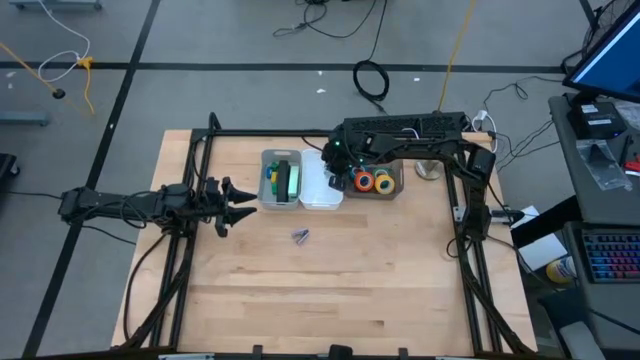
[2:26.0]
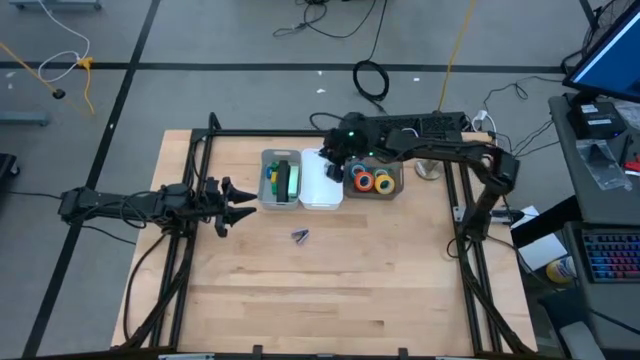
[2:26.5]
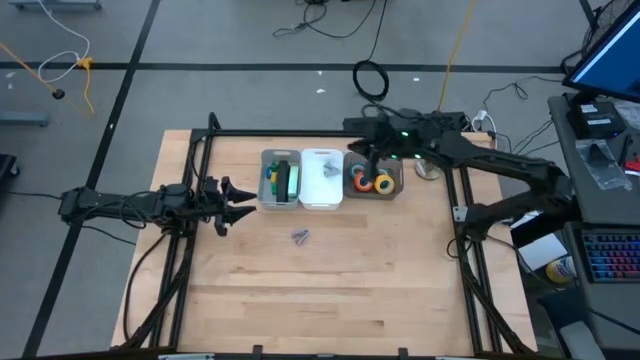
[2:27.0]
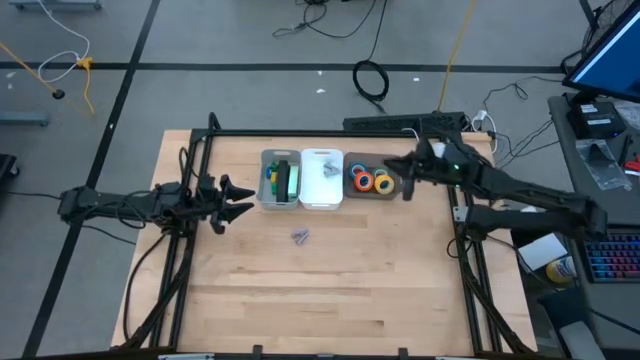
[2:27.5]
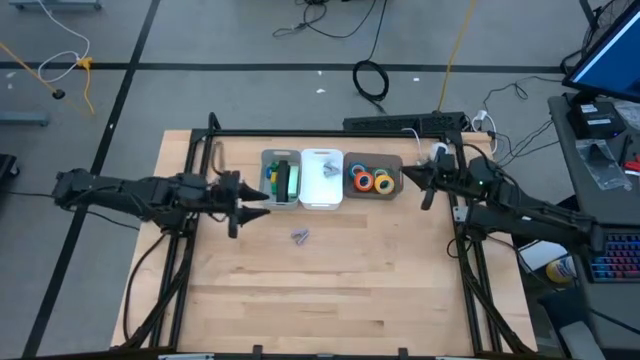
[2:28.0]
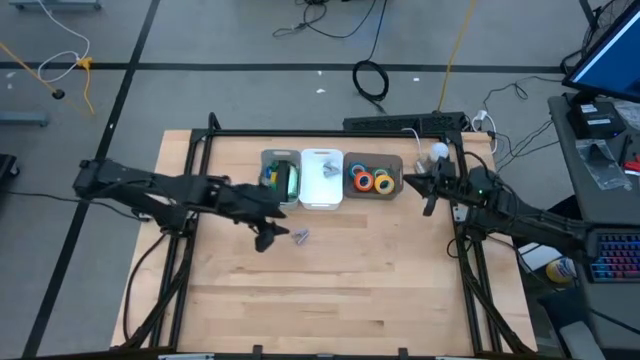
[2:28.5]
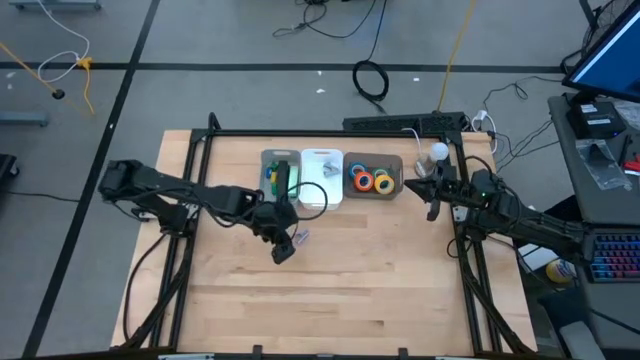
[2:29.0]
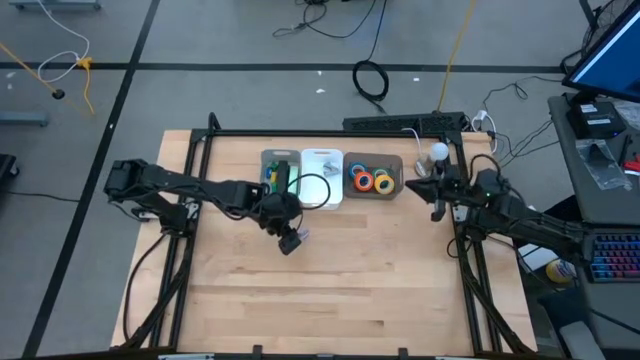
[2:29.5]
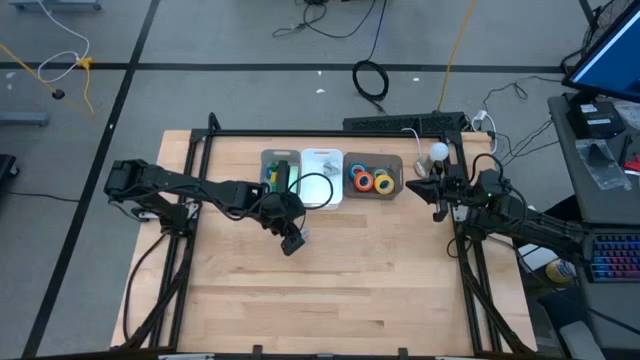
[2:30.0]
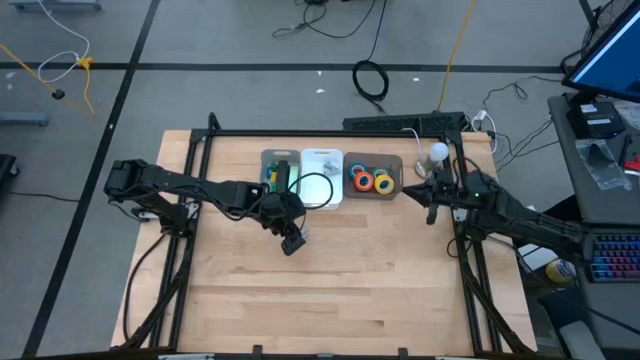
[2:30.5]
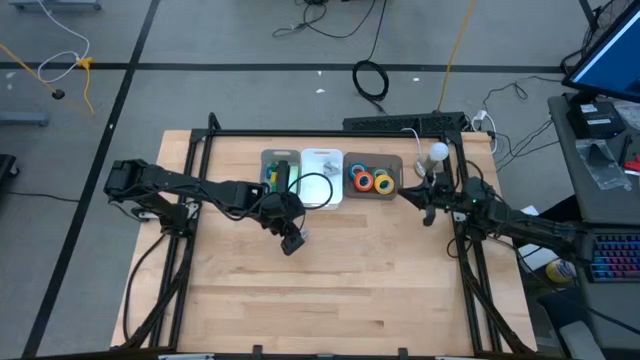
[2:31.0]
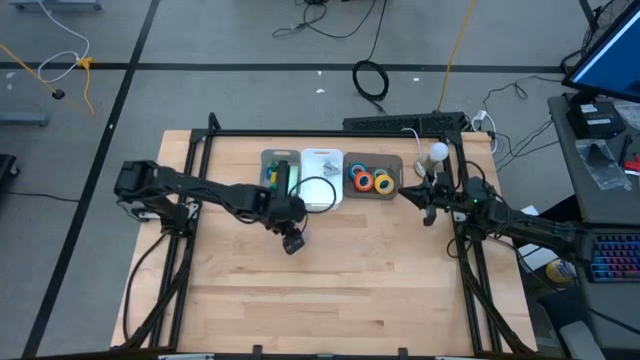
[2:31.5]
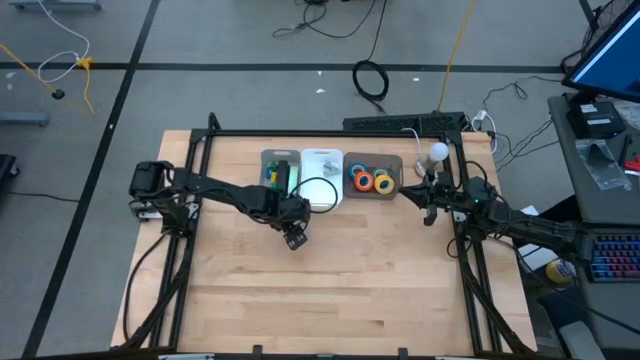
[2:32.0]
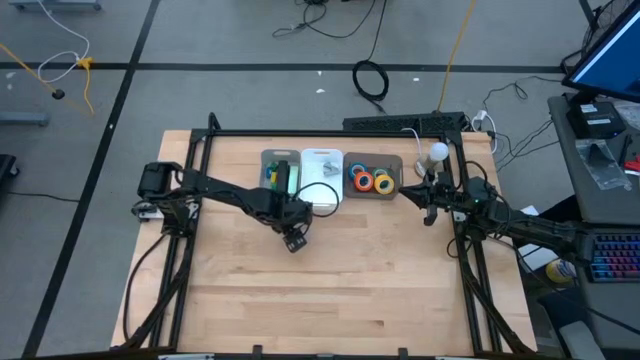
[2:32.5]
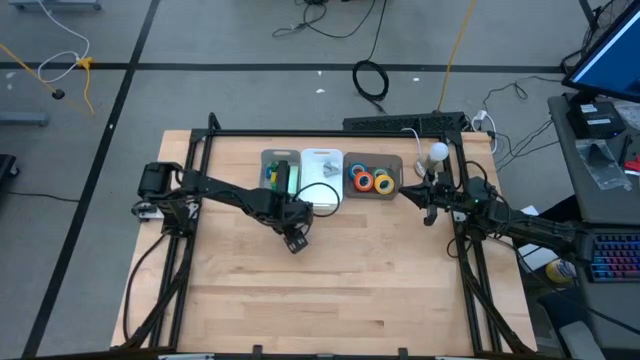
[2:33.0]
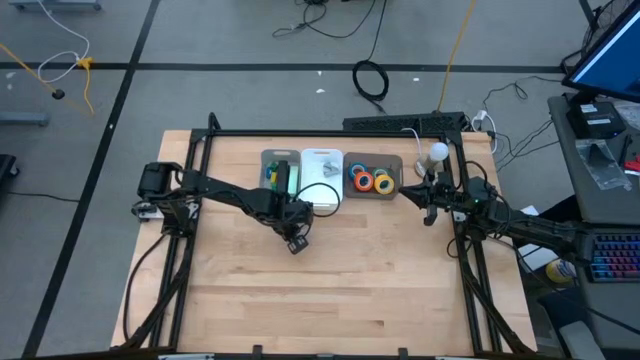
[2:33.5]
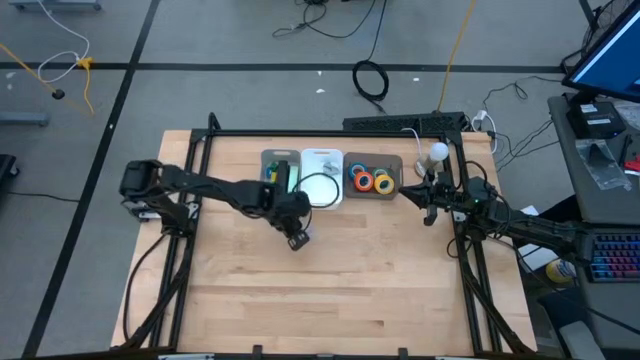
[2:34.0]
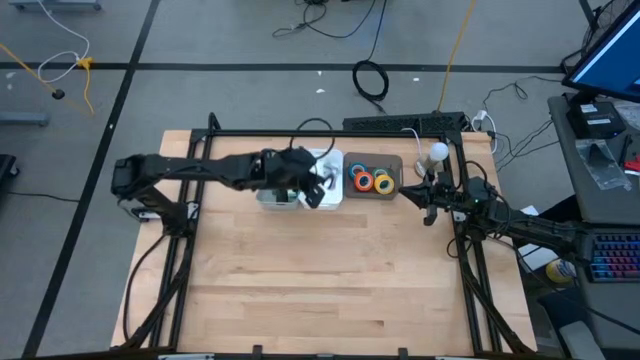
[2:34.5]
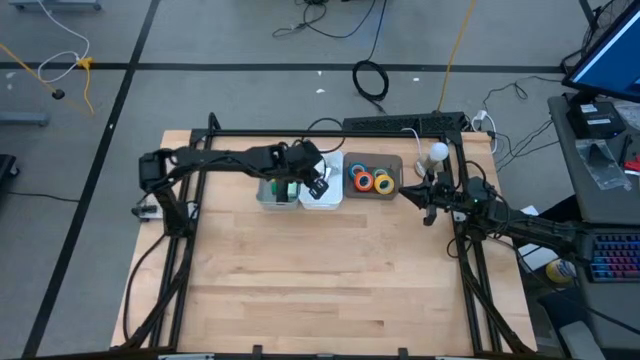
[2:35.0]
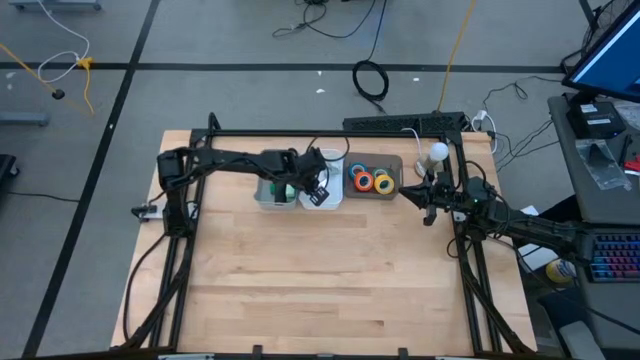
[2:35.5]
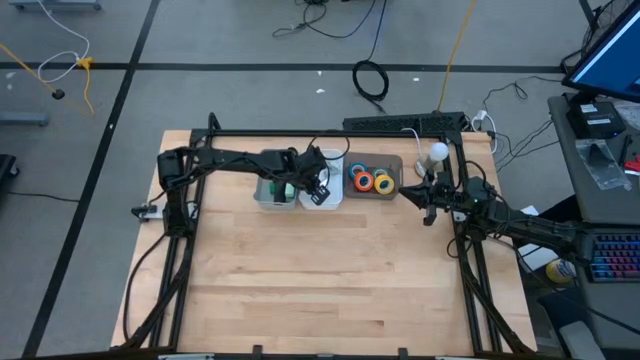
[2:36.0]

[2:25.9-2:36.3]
Task: Pick and place Stapler, Stapler remover, tape
Put the violet staple remover into the white bin

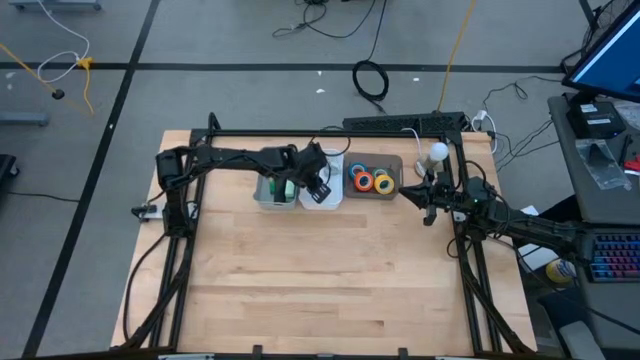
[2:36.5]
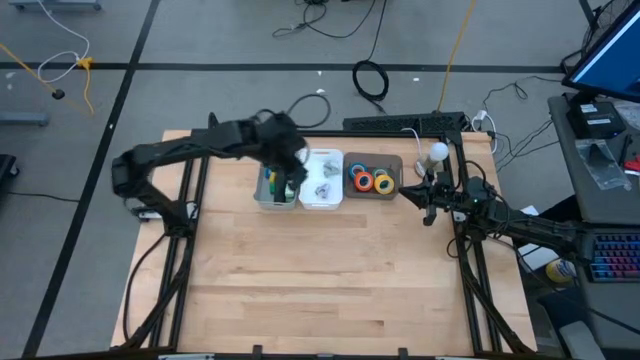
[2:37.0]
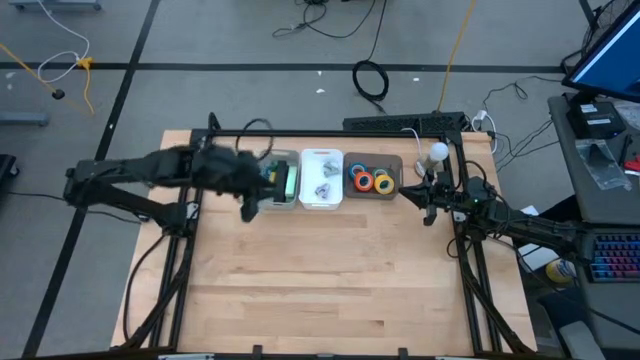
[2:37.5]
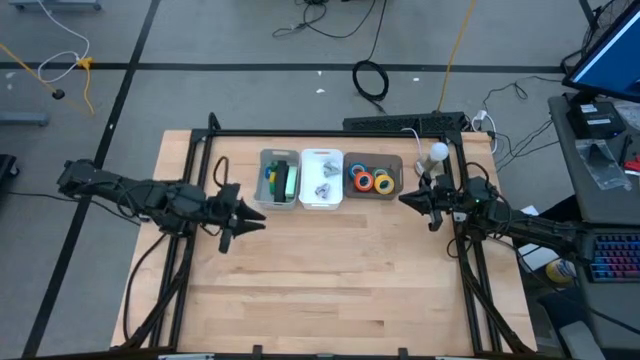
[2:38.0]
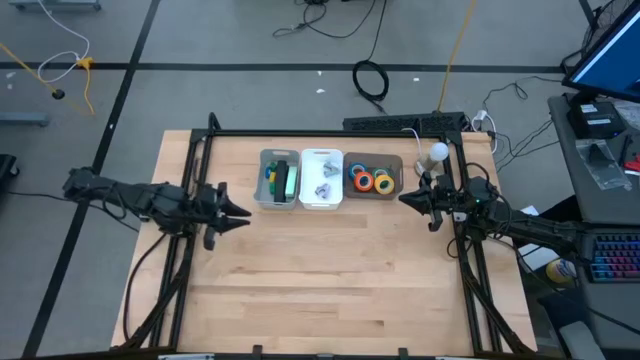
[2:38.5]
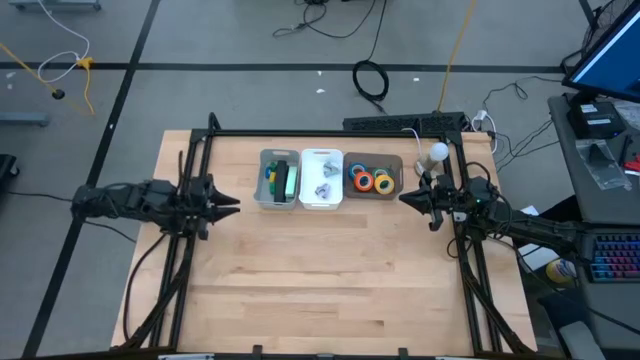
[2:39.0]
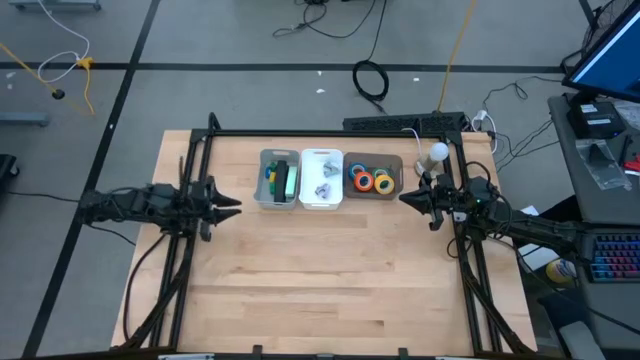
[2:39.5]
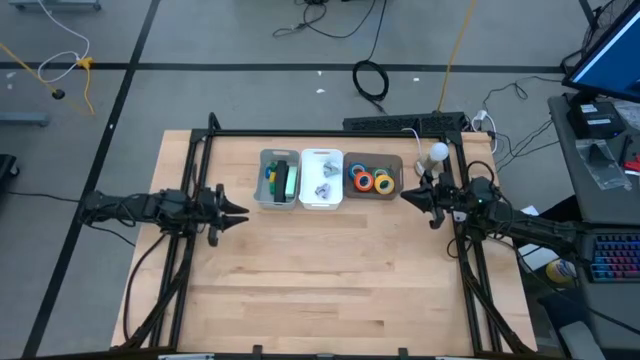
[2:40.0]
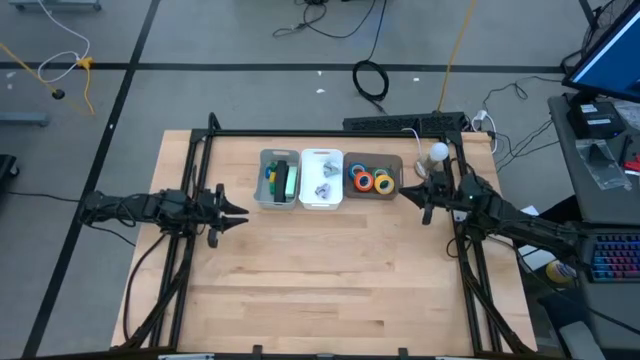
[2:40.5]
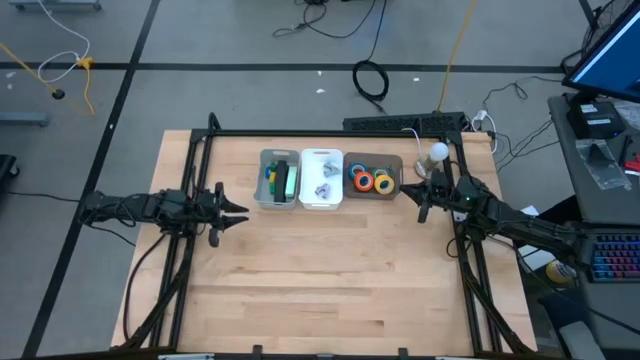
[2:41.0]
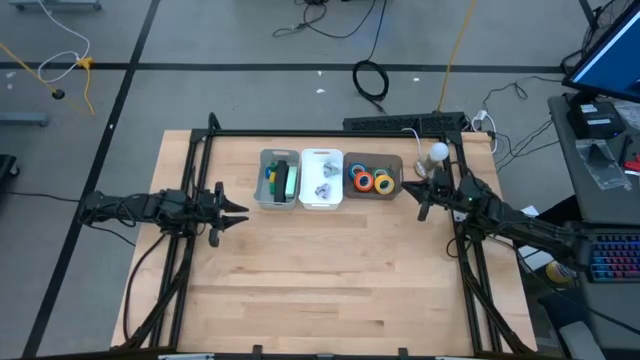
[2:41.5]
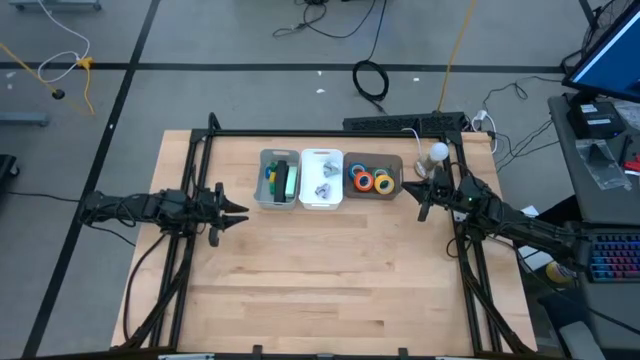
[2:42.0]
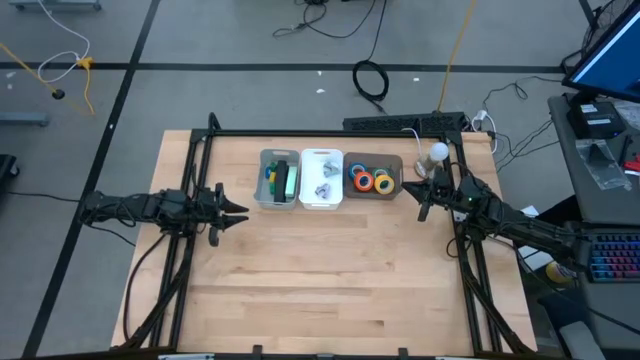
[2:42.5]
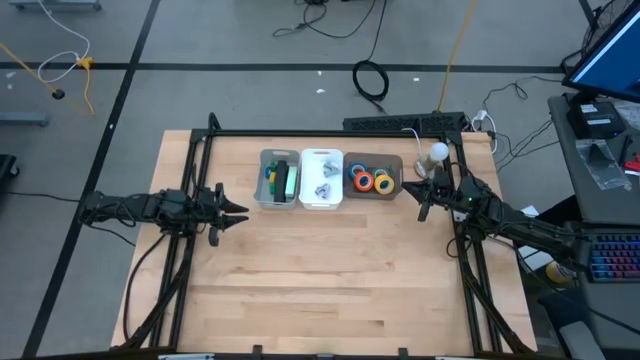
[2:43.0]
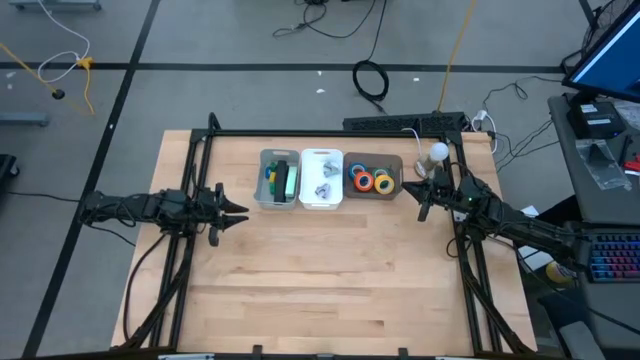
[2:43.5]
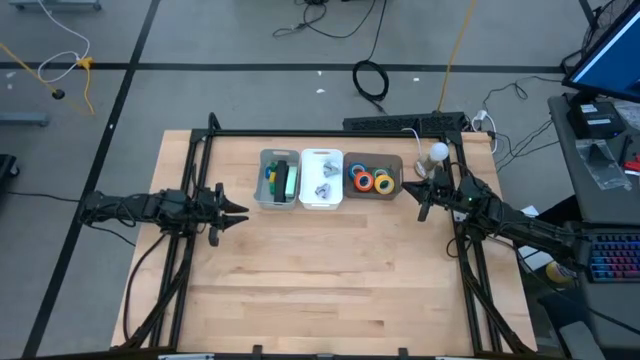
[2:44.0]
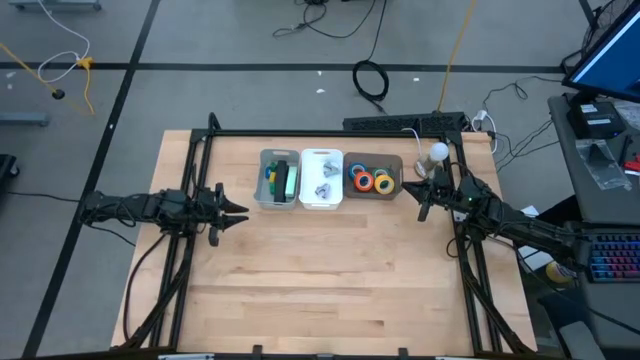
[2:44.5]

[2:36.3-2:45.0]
Return to Home Position

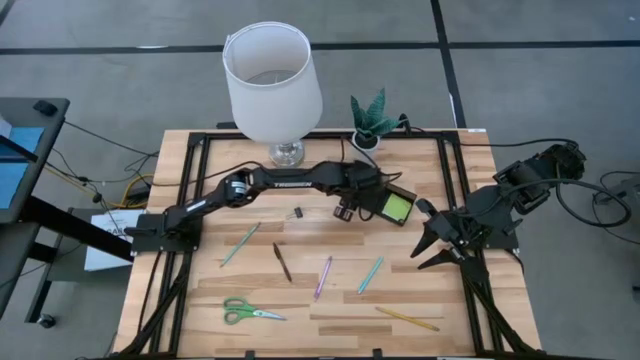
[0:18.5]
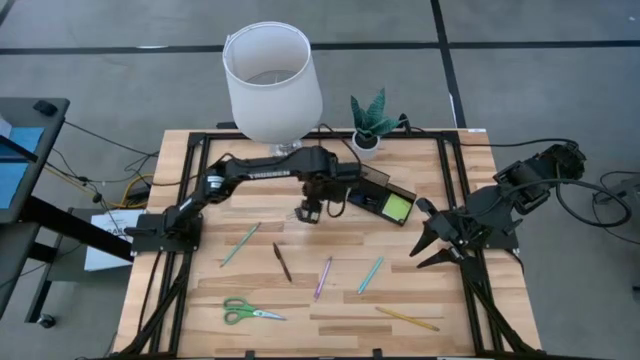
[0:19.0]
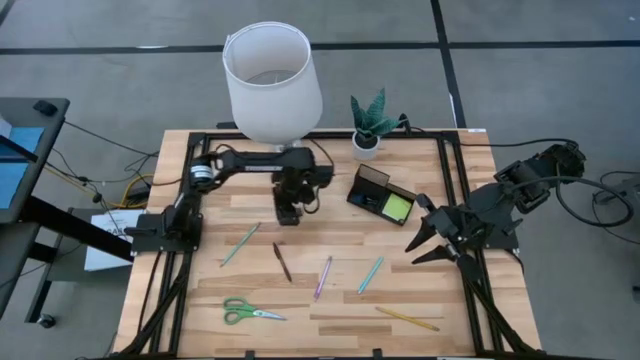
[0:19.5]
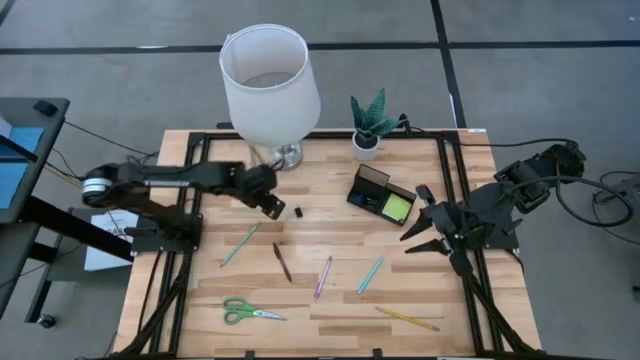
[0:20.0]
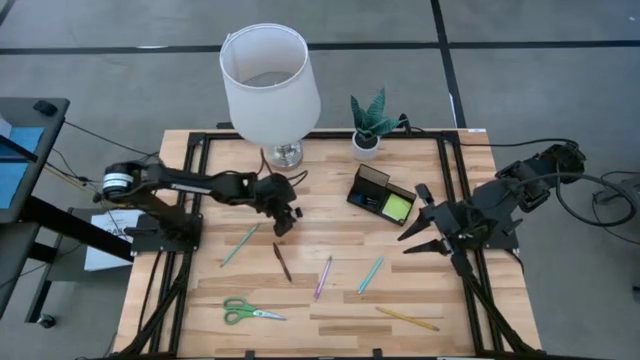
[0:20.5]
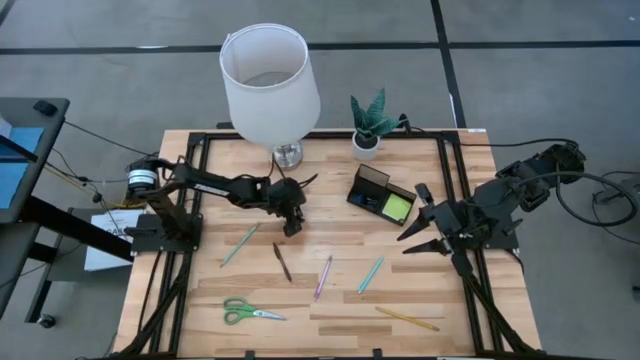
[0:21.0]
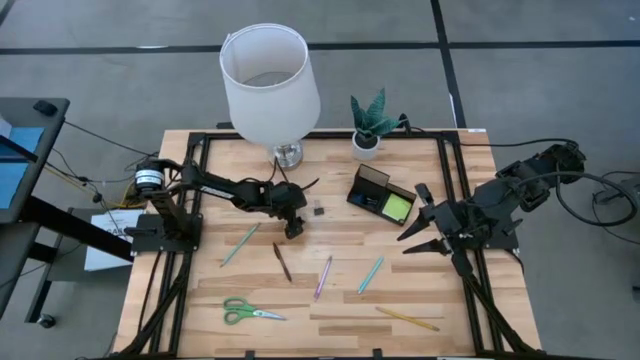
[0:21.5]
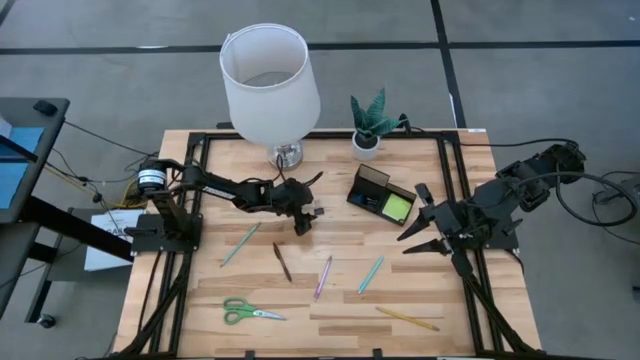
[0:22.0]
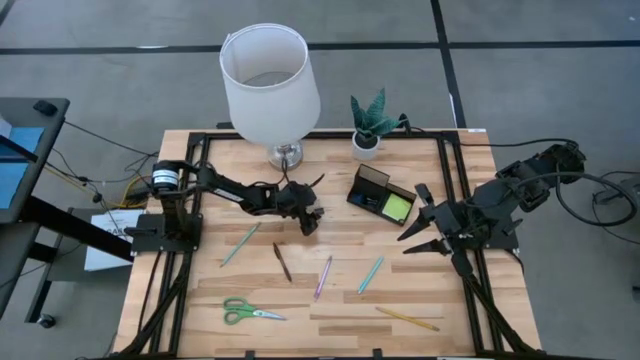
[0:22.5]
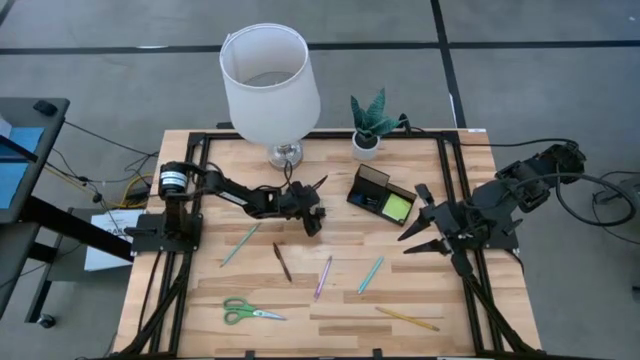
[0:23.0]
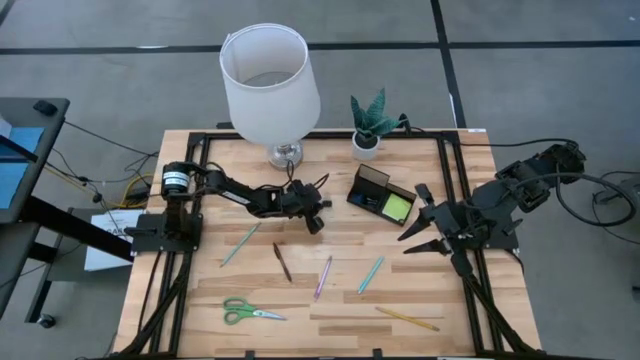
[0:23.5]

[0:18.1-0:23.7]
Task: Pick and place office supplies into organizer
Put the black binder clip into the black organizer
